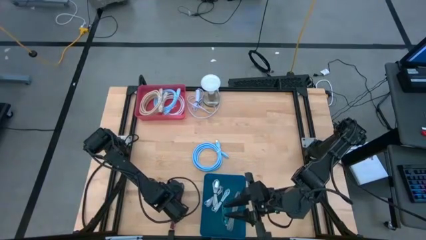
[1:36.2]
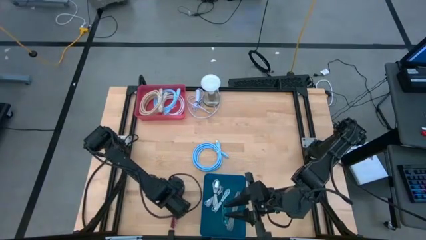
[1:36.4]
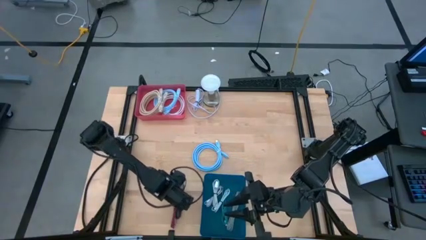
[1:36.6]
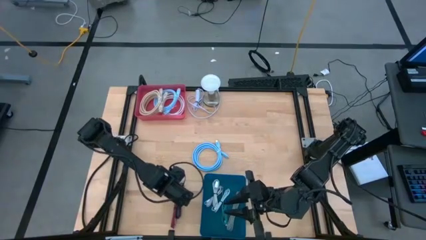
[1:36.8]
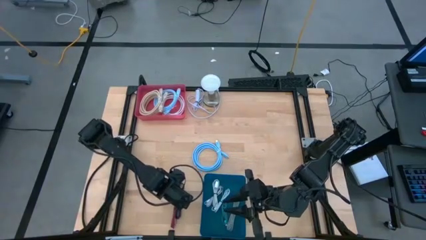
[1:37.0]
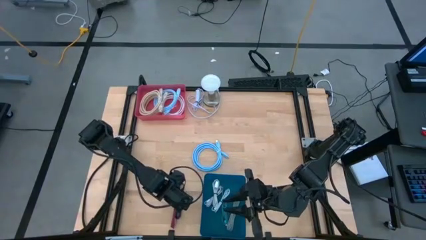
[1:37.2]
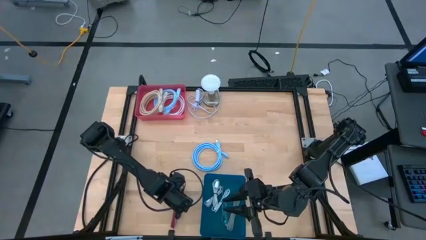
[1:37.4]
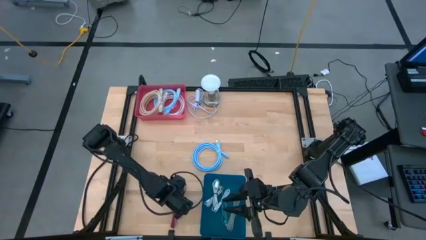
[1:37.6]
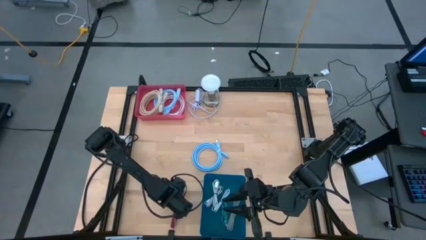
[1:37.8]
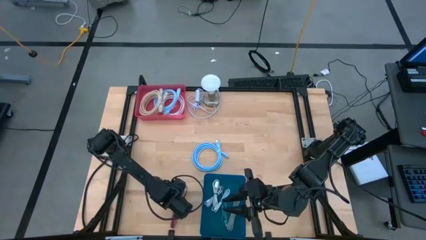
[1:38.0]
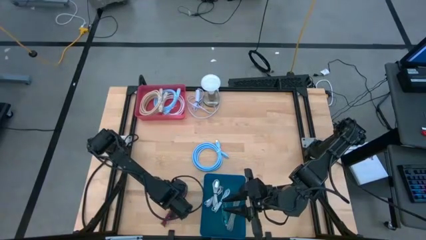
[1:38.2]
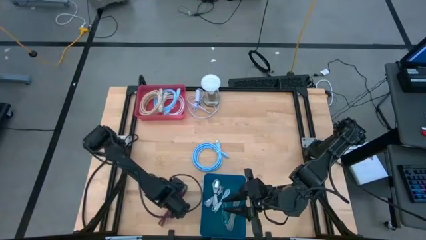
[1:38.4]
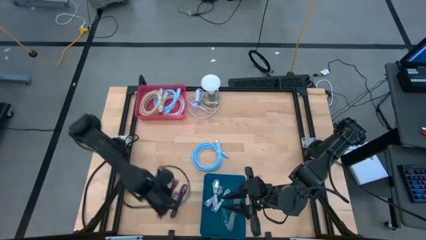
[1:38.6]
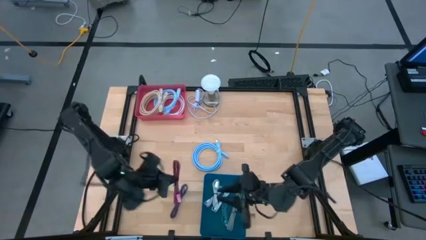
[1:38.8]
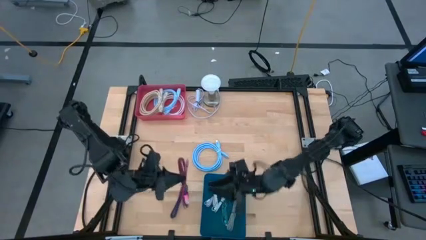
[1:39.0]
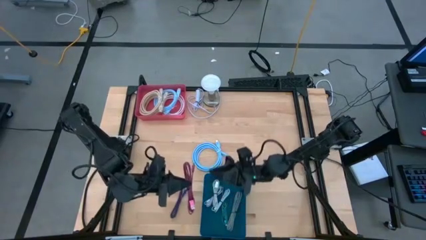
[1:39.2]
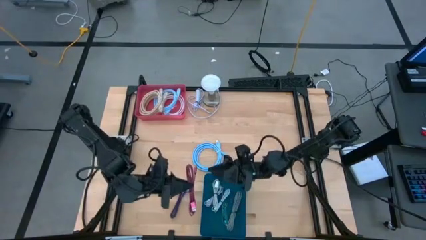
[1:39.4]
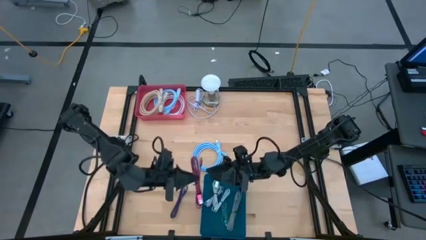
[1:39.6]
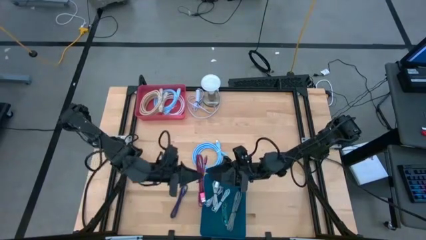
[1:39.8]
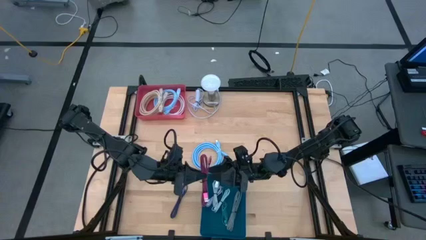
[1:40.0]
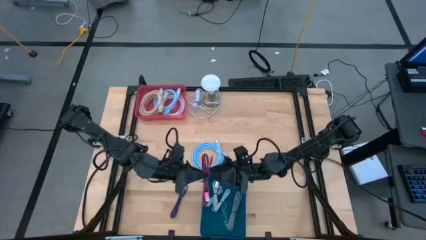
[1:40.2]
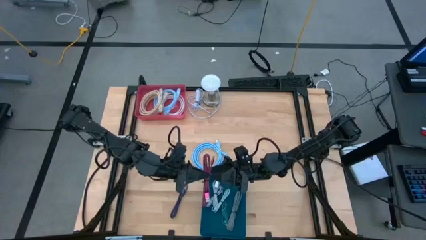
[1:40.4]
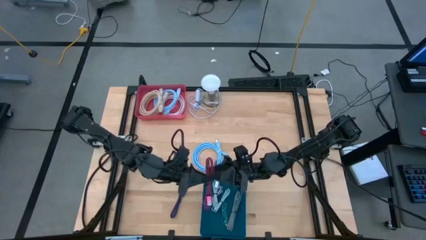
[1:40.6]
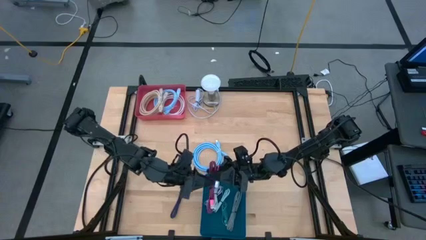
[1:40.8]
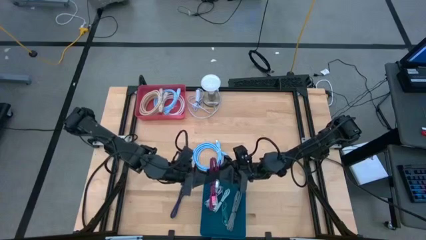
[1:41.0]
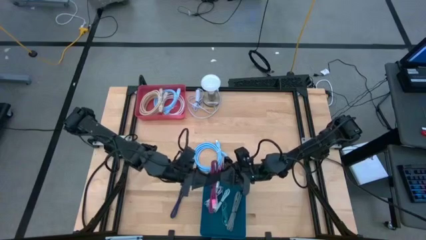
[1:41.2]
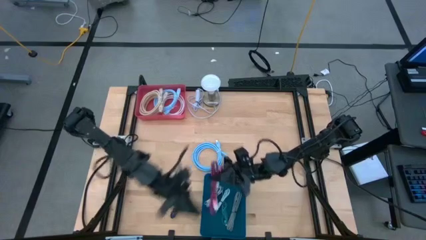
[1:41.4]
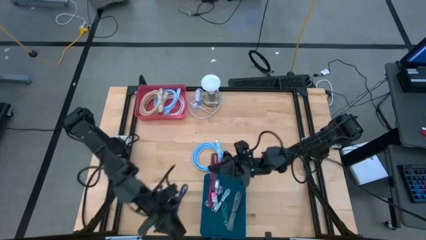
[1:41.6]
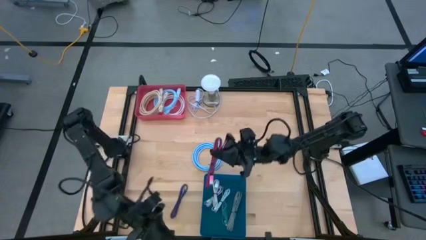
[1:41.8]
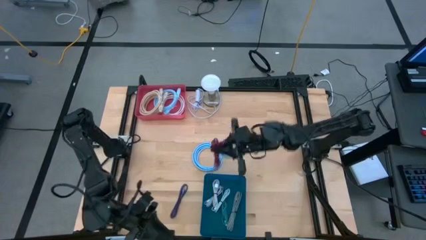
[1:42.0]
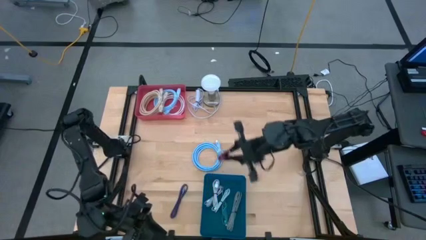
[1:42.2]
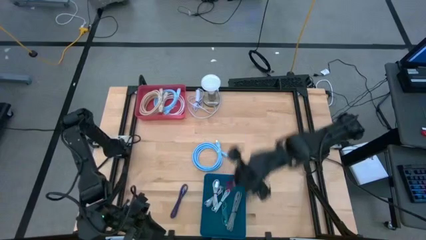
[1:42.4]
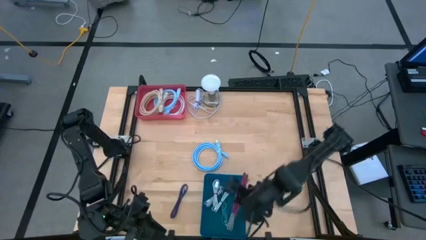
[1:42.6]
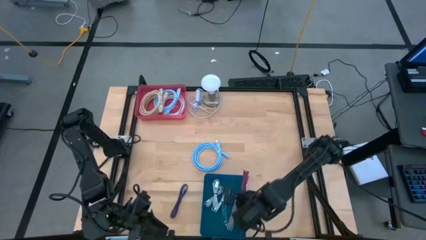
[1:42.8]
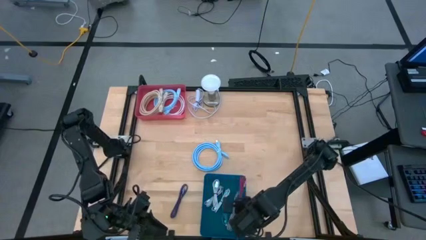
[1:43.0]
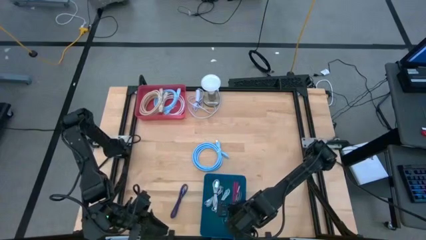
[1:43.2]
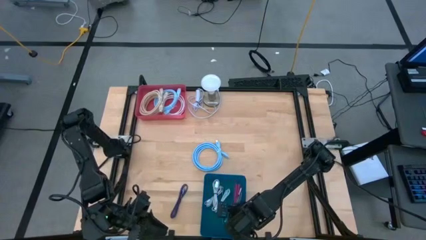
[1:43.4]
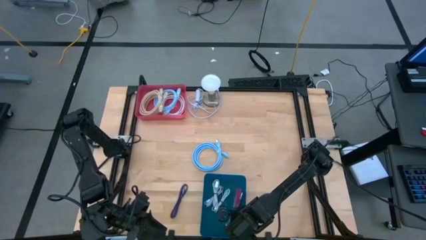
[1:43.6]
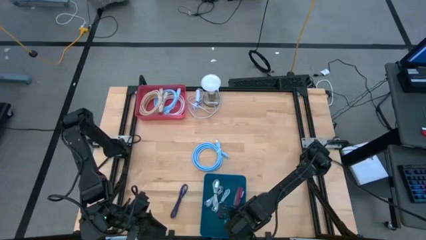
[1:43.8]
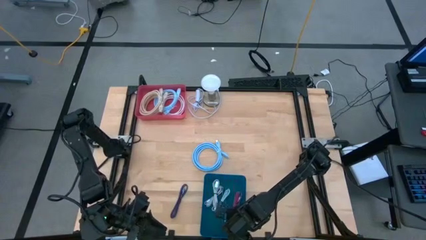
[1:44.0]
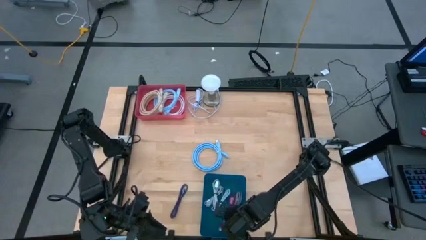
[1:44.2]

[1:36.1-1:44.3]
Task: Pick & Place USB Port
Put the red USB cable into the blue bin

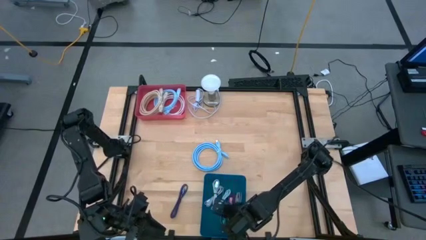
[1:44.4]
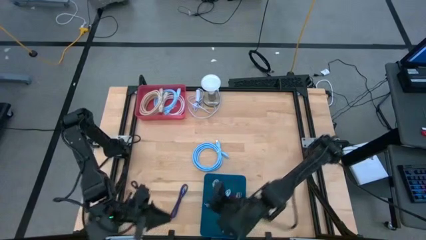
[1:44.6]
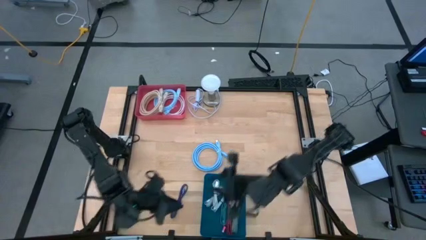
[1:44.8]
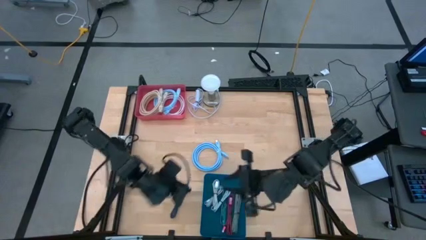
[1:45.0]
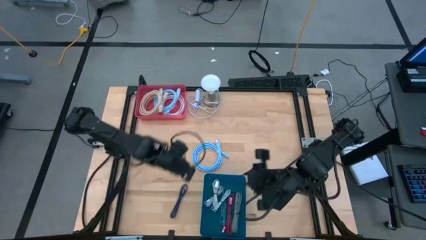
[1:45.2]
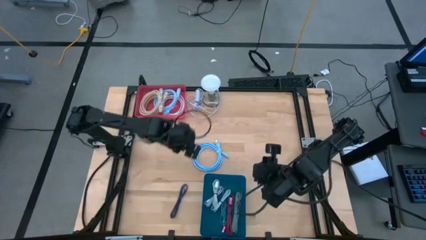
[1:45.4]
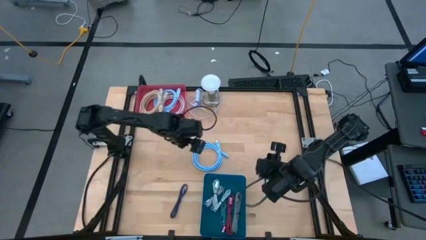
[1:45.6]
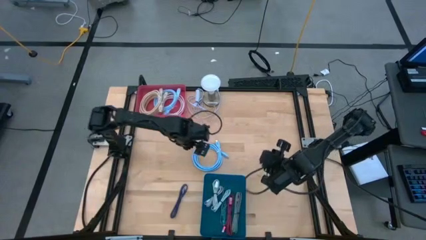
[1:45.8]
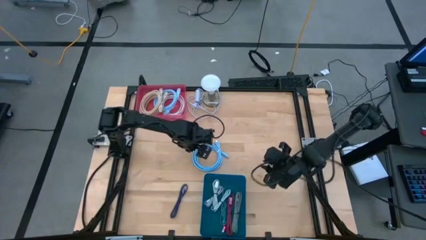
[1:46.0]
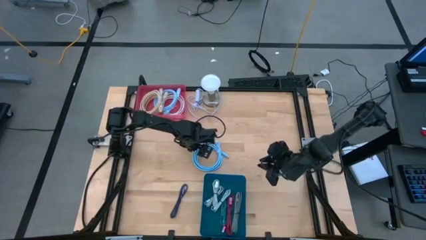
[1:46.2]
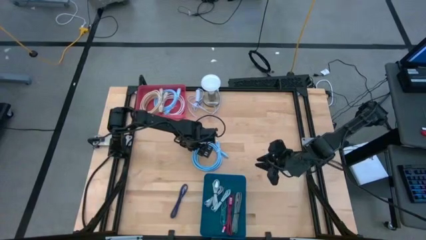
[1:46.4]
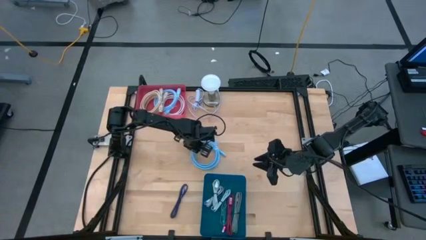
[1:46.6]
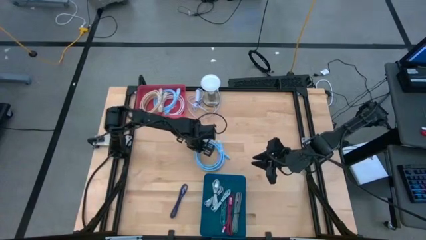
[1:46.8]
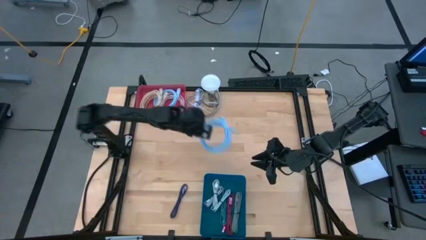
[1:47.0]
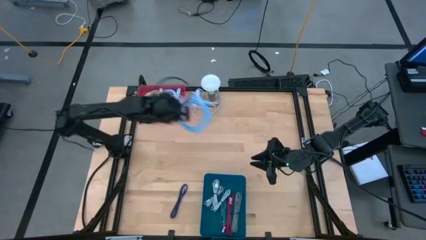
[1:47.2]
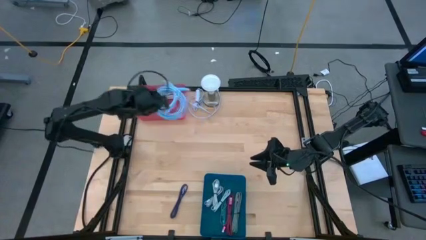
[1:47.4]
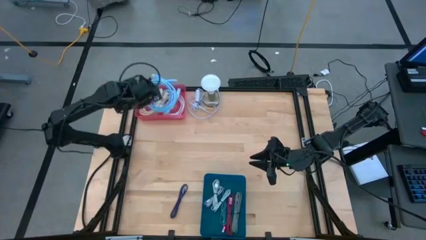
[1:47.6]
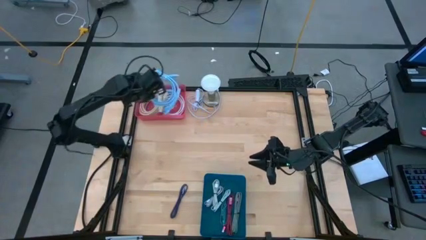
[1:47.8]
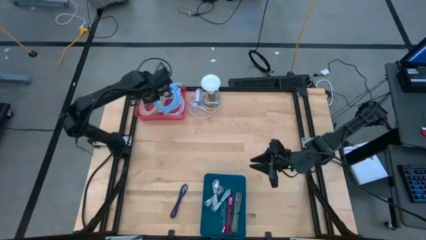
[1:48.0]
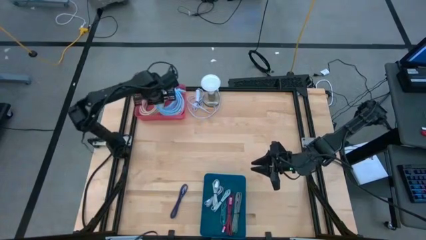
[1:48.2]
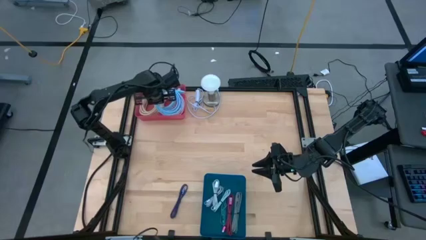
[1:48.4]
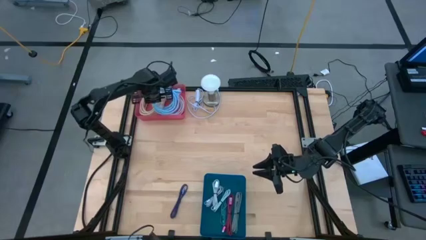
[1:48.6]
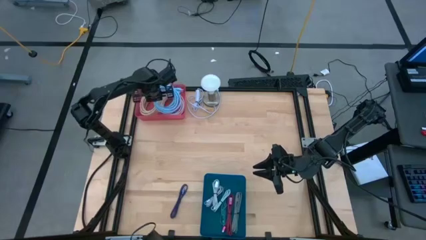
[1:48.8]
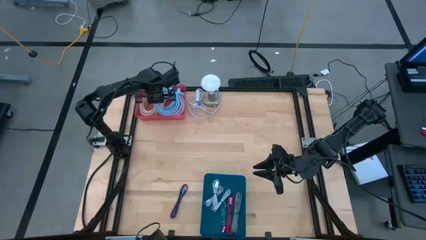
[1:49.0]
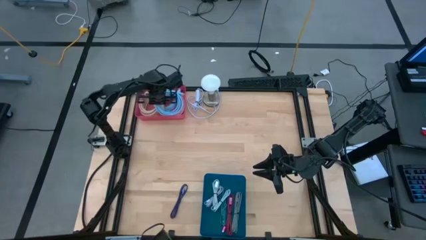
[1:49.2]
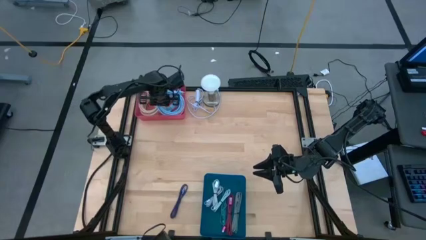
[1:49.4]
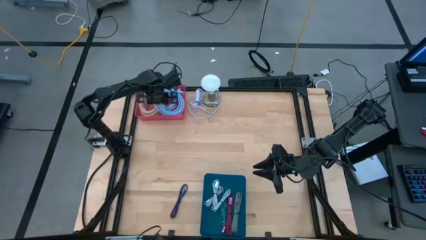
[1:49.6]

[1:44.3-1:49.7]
Put the blue HDMI cable into the red bin

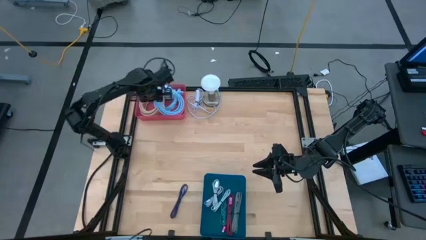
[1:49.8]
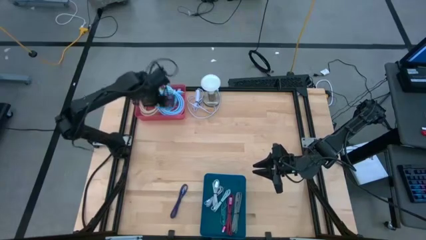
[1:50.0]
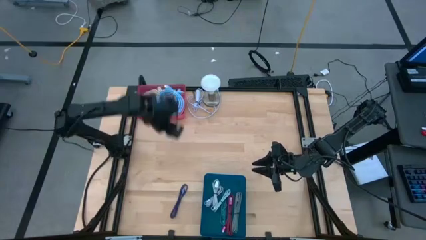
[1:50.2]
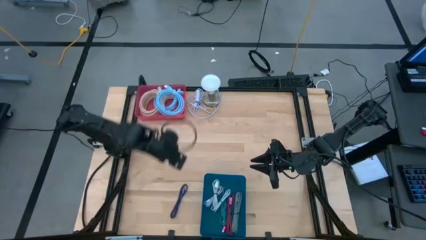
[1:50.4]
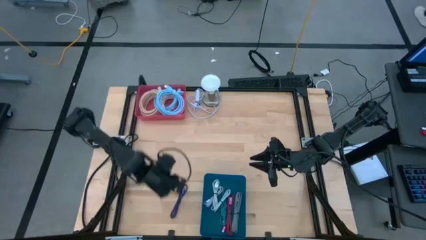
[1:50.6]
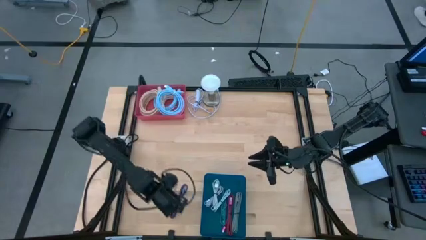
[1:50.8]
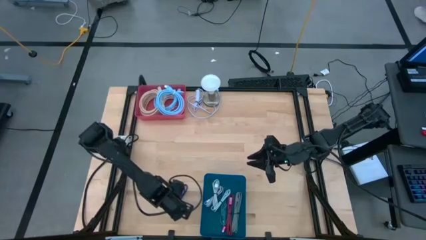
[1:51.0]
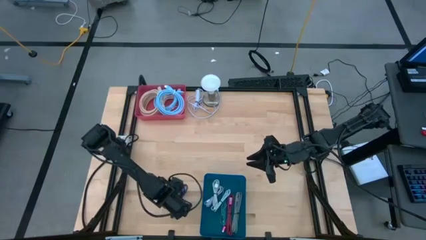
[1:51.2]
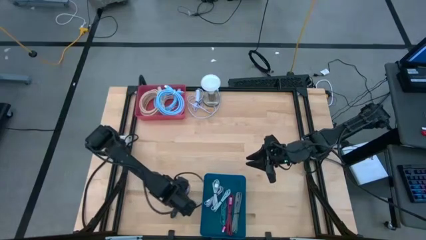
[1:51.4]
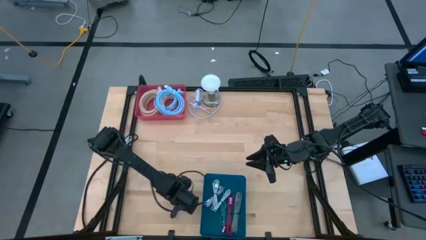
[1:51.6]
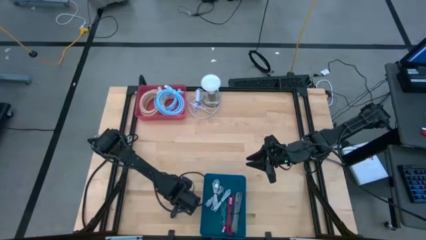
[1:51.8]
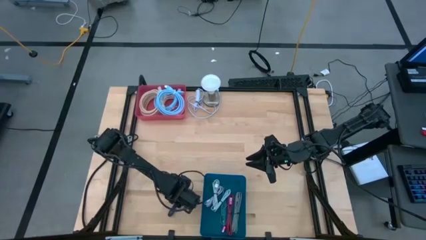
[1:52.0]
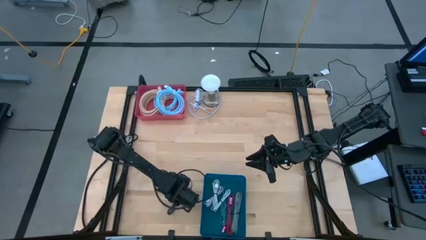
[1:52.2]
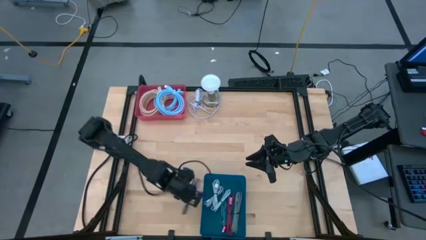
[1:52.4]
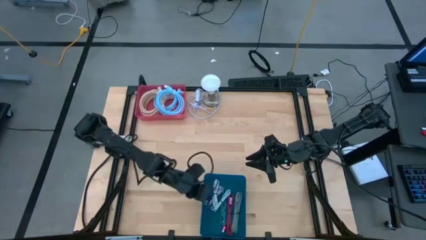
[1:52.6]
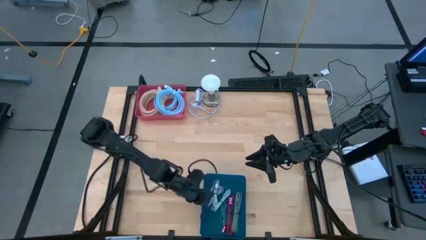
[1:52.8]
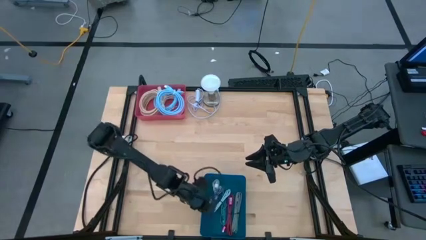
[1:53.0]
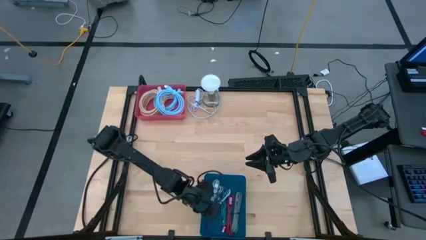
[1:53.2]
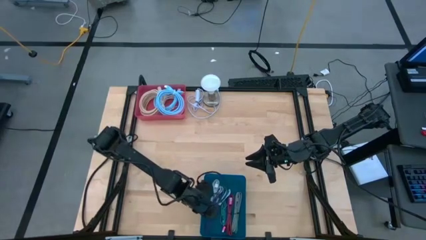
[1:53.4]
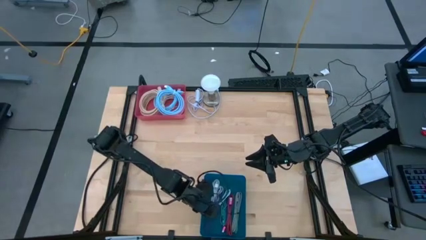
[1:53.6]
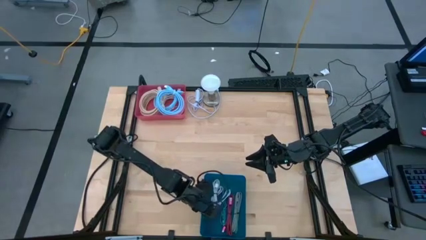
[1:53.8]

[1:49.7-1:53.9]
Put the purple USB cable into the blue bin
